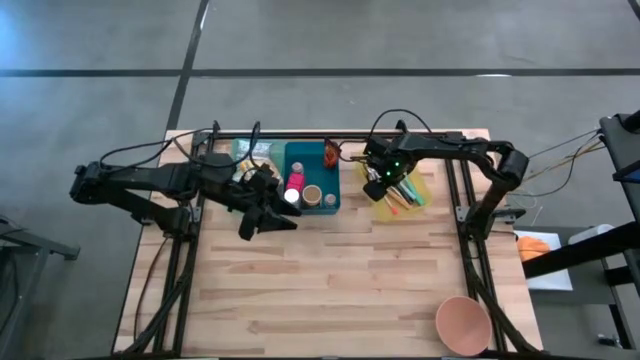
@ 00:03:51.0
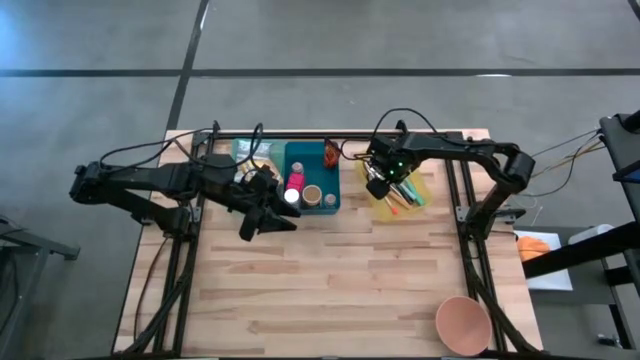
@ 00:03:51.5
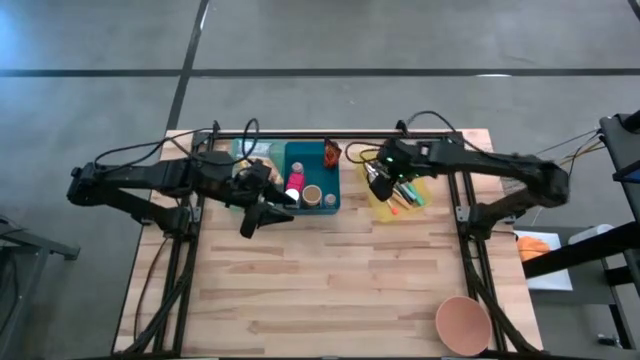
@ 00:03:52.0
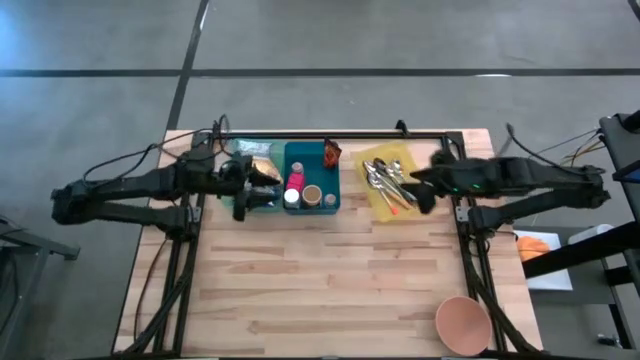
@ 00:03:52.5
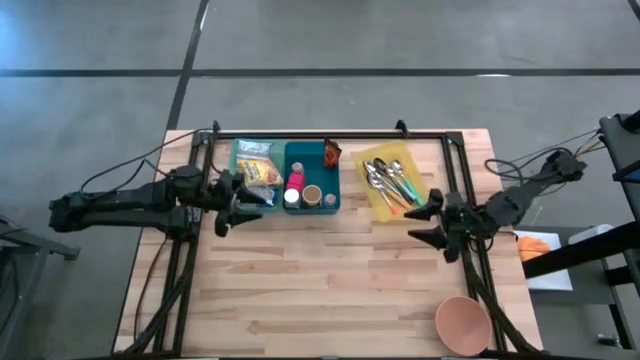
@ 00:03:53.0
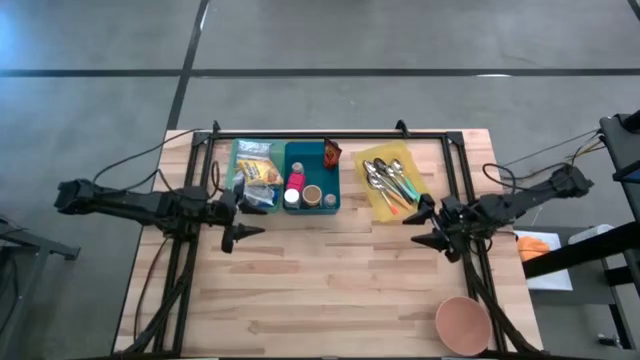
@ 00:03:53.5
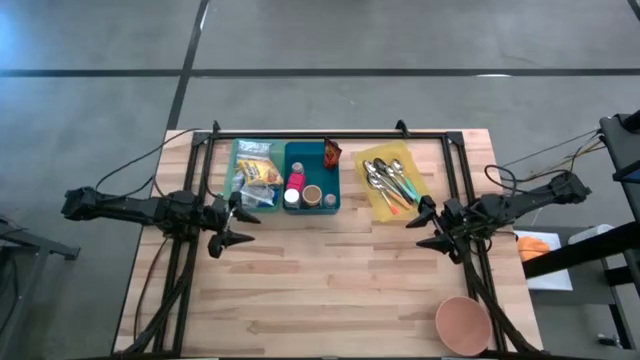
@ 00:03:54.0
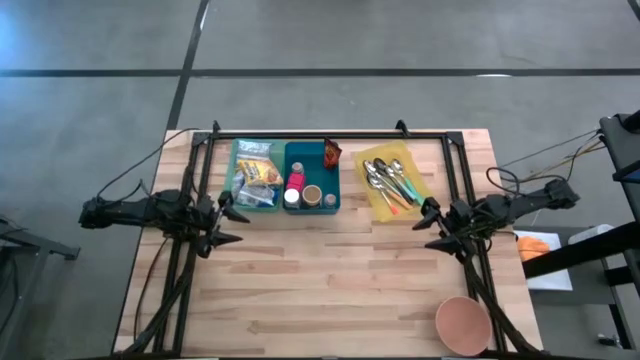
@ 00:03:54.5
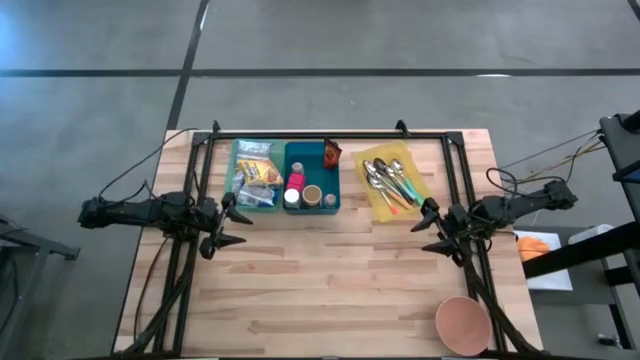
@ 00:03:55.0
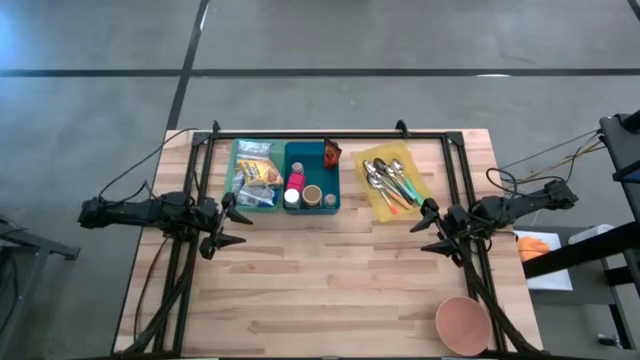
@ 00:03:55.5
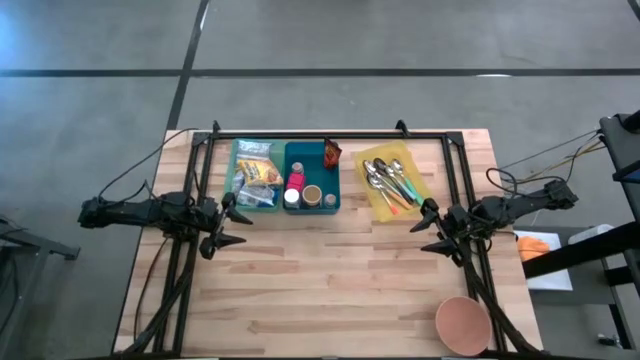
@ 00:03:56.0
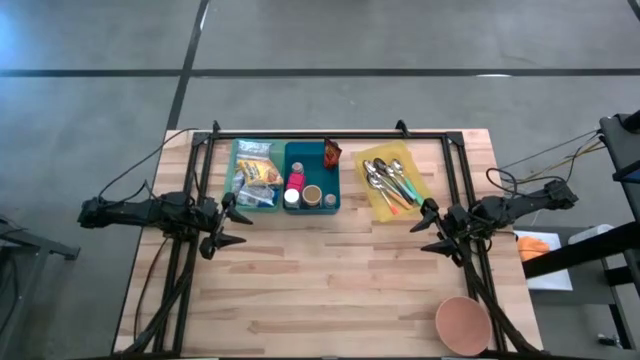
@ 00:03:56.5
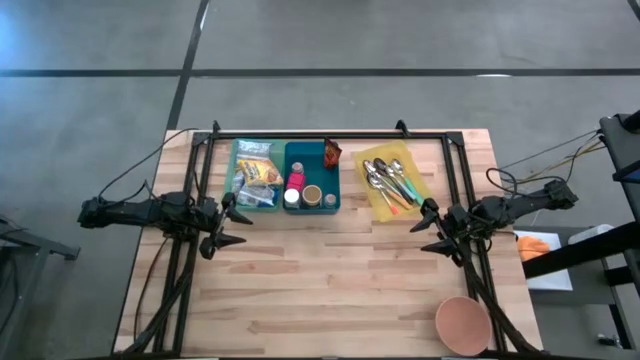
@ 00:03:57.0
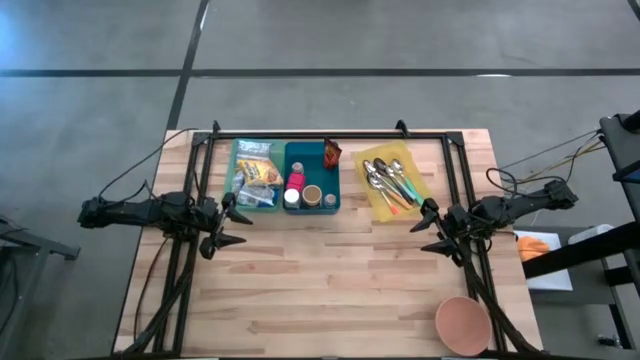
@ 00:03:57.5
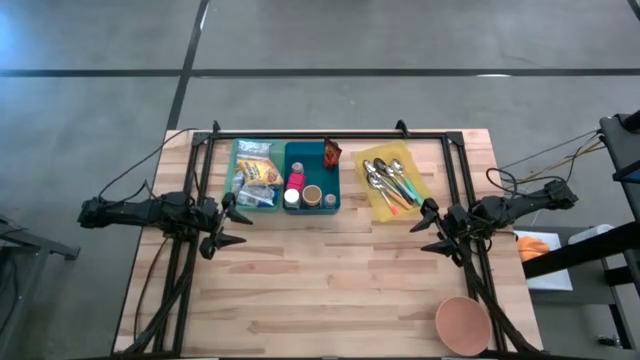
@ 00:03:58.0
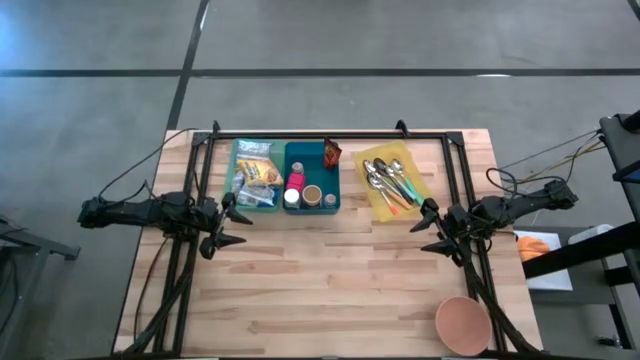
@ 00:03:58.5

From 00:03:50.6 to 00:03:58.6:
Return to Home Position

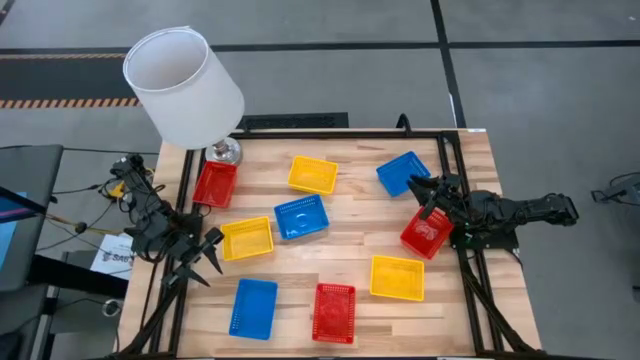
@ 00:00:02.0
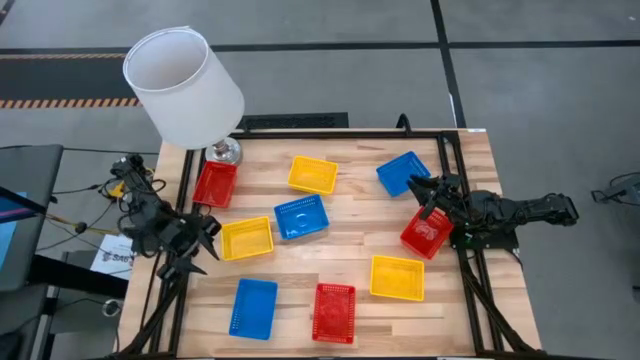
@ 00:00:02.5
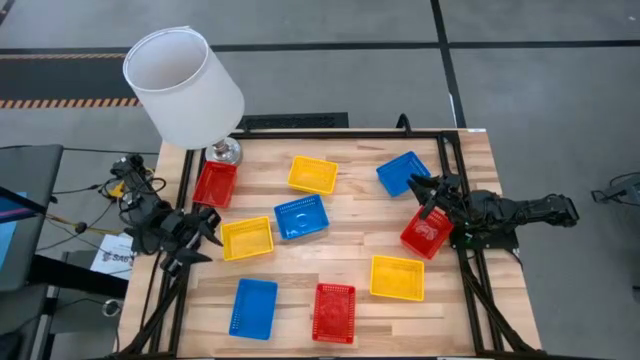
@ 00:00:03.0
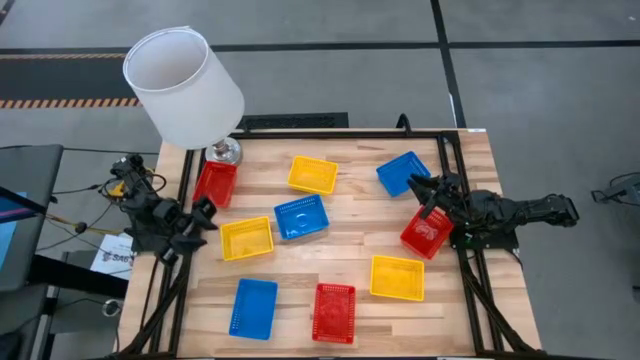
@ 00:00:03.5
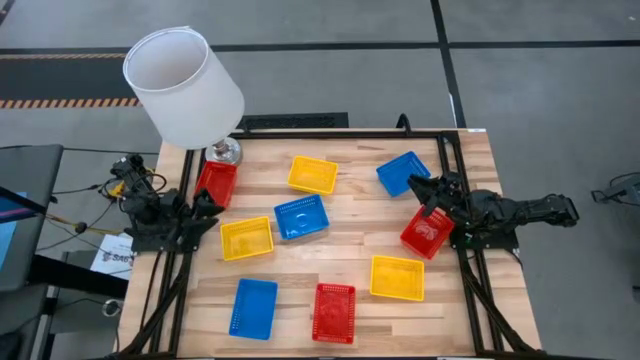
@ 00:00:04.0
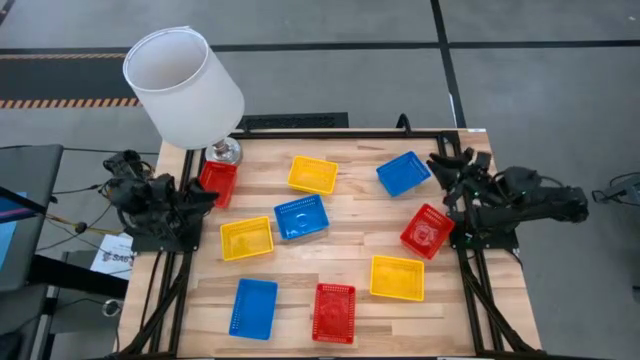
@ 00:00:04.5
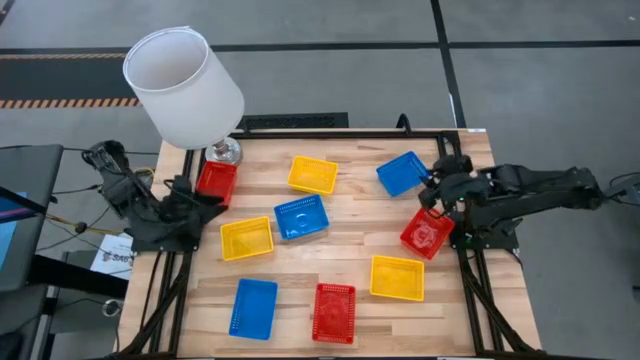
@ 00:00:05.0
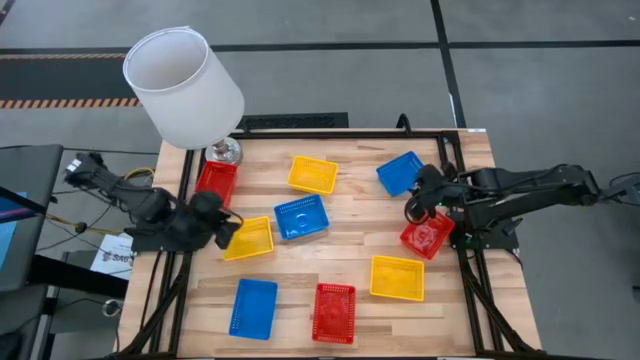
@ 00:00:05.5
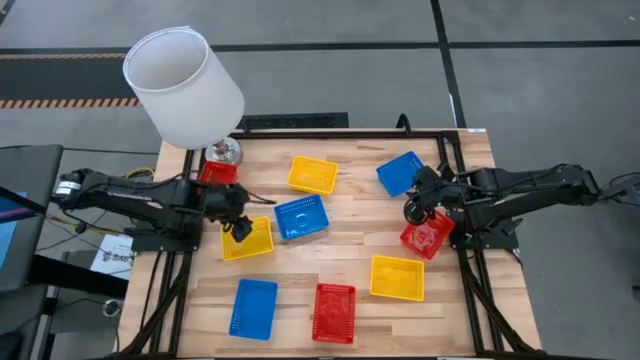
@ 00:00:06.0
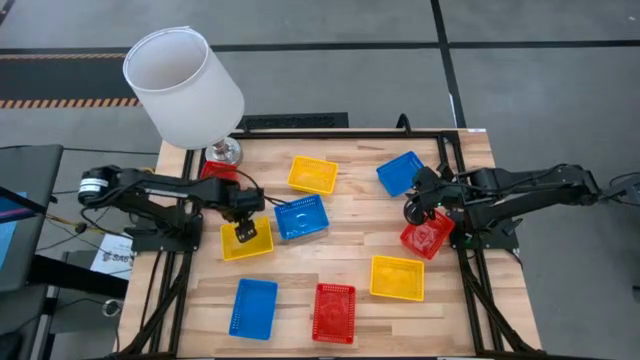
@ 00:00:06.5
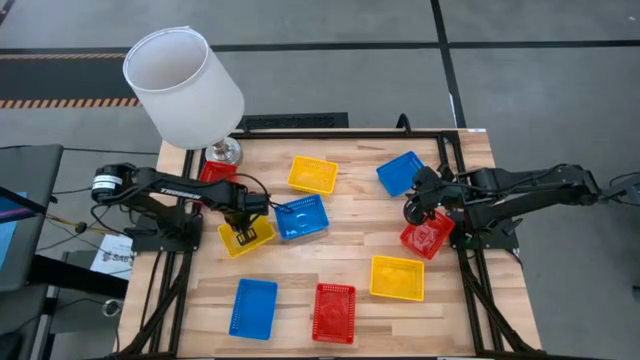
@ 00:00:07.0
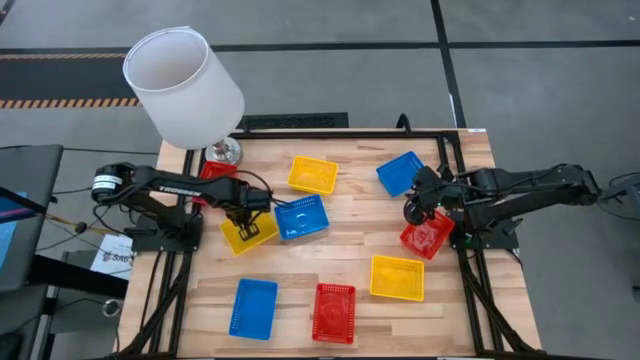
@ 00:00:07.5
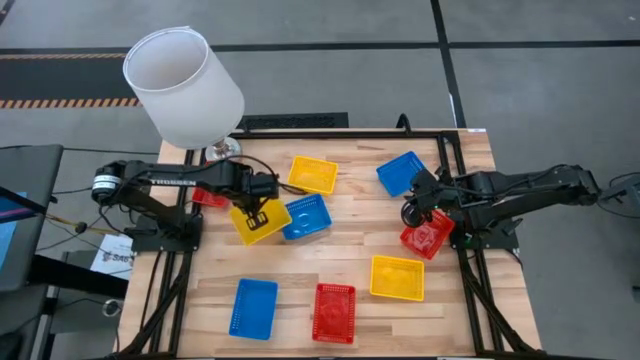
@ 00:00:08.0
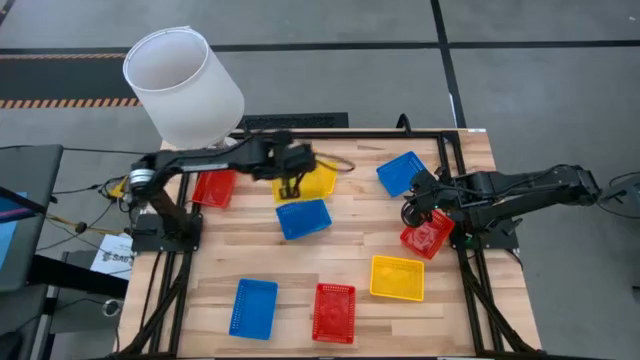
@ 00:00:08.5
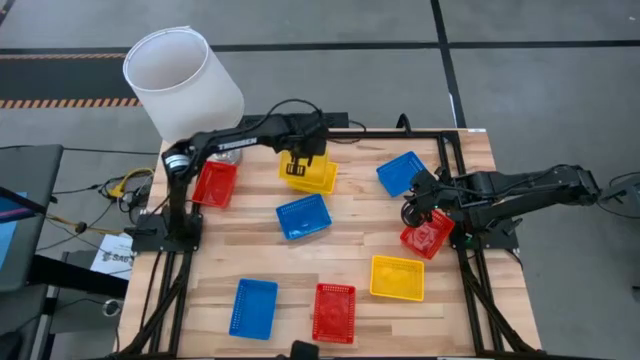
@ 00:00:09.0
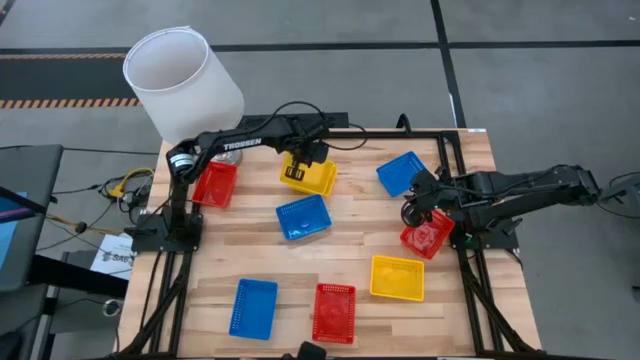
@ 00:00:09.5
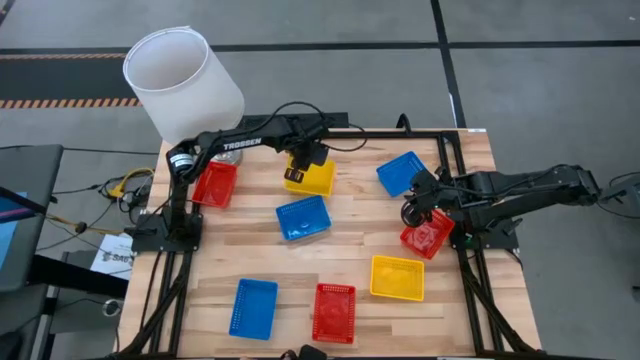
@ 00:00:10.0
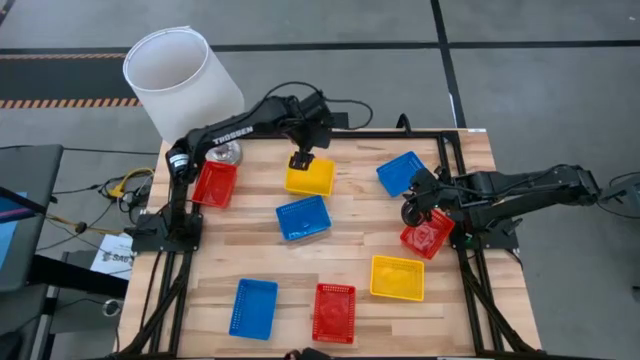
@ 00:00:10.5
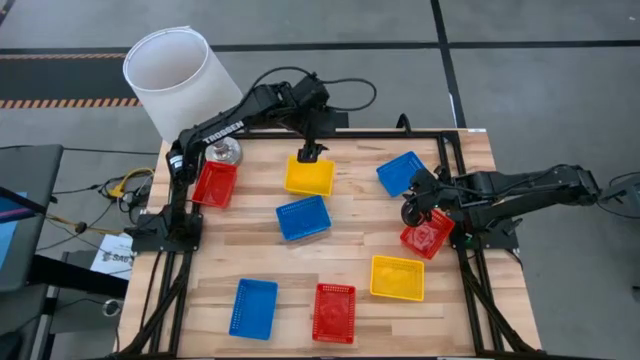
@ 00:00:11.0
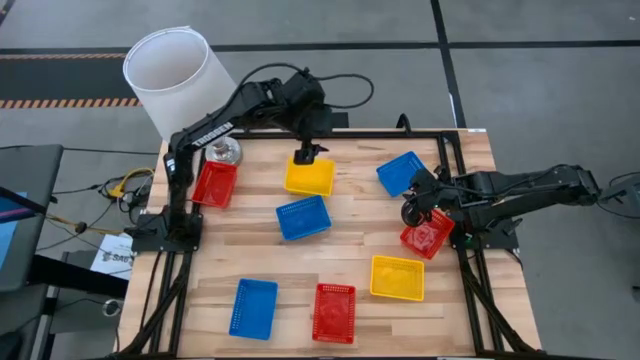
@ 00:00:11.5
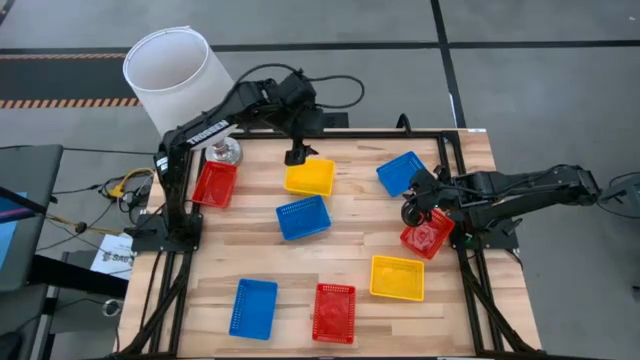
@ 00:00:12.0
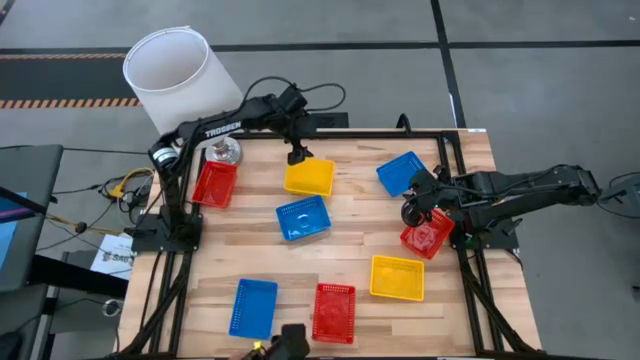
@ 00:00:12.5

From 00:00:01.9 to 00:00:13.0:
Stack the left yellow bin on top of the middle yellow bin
